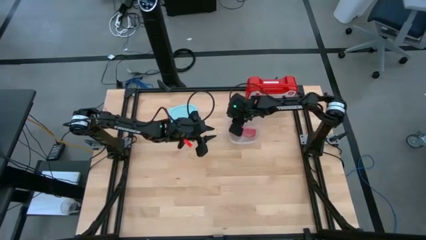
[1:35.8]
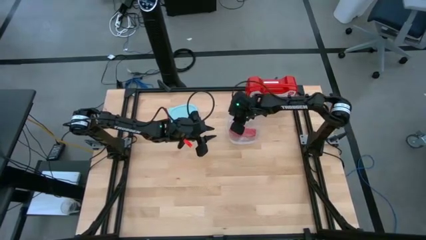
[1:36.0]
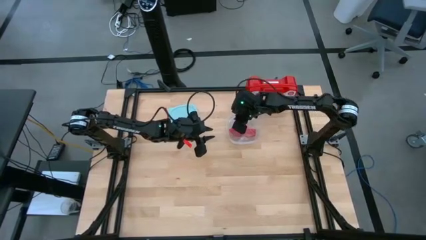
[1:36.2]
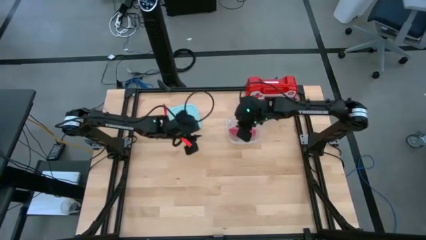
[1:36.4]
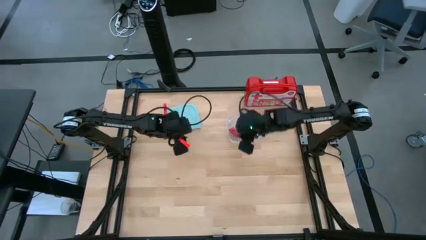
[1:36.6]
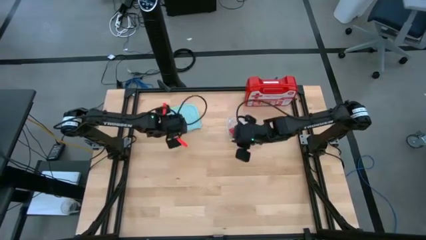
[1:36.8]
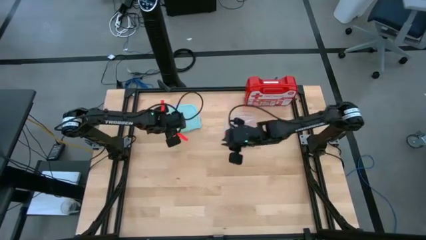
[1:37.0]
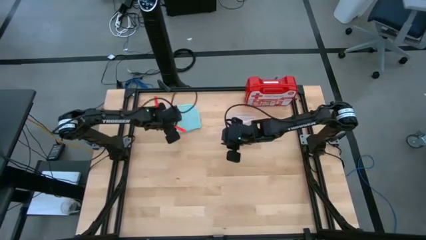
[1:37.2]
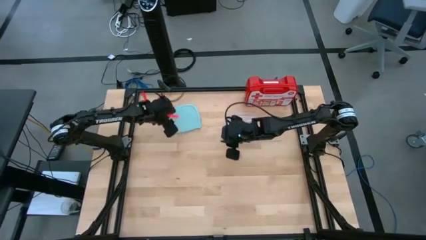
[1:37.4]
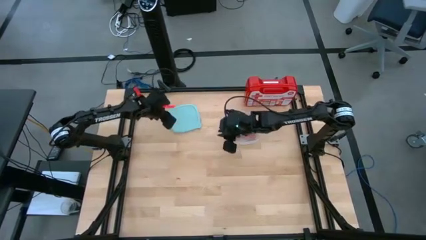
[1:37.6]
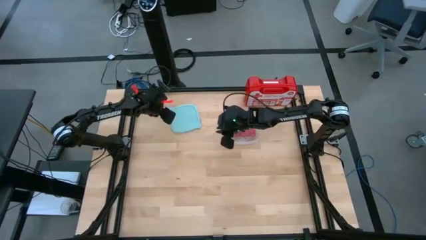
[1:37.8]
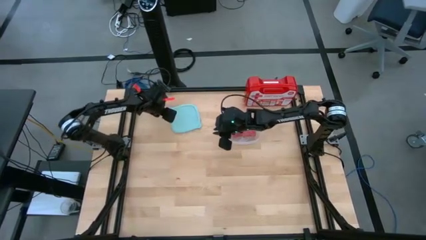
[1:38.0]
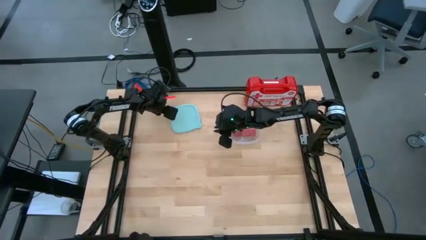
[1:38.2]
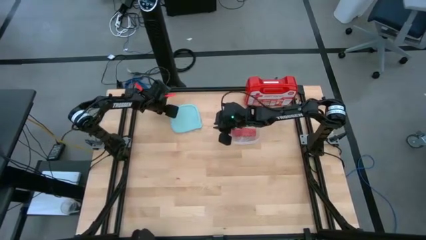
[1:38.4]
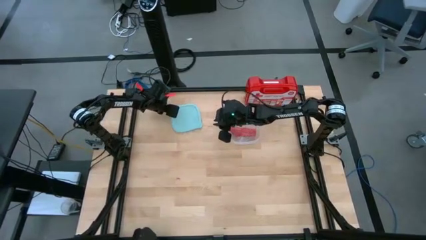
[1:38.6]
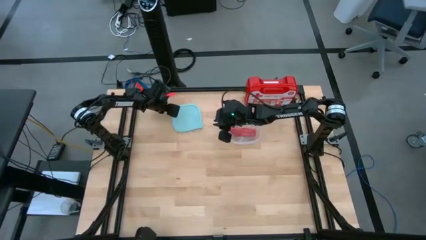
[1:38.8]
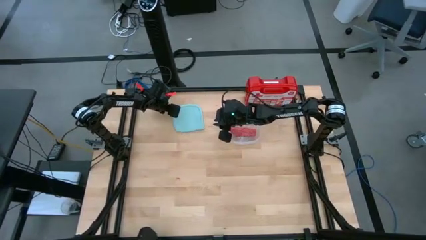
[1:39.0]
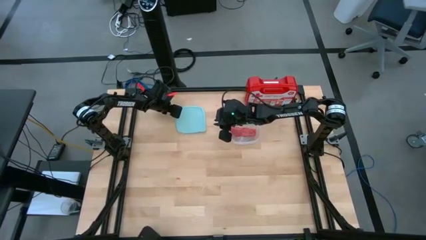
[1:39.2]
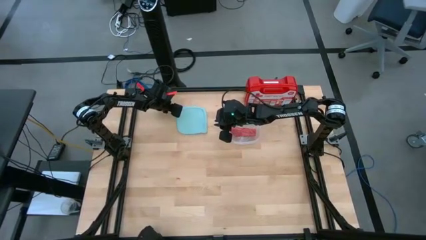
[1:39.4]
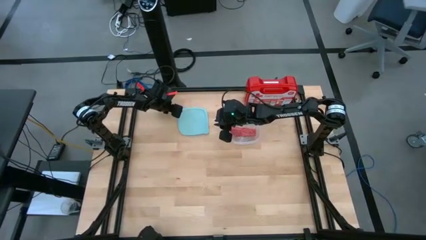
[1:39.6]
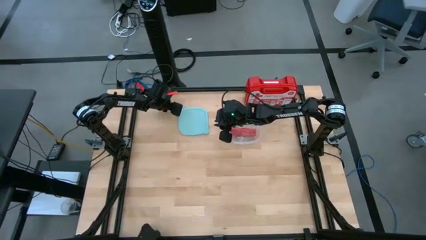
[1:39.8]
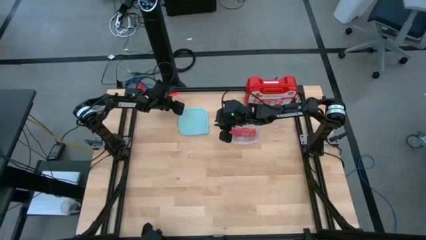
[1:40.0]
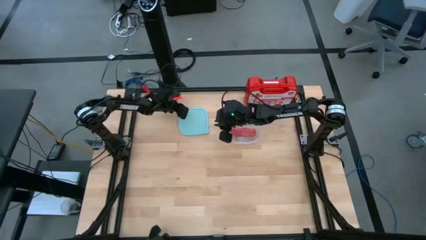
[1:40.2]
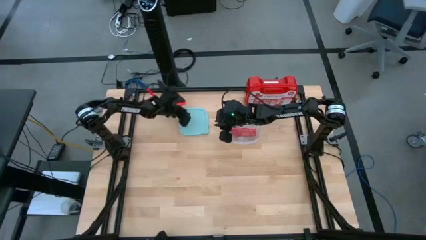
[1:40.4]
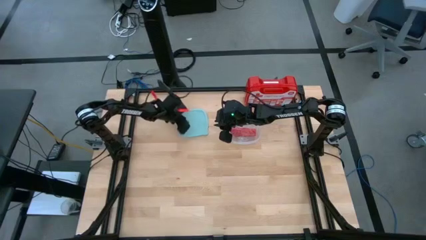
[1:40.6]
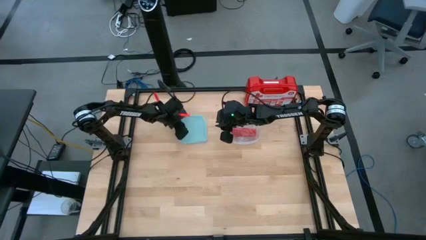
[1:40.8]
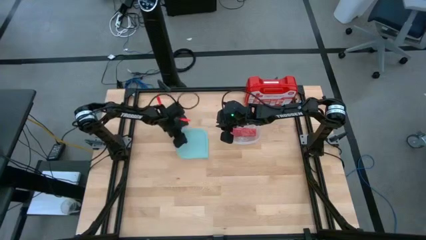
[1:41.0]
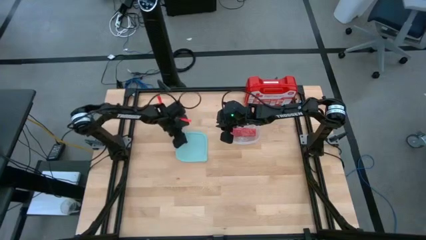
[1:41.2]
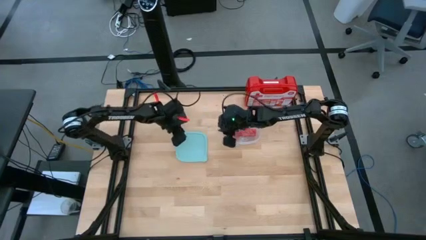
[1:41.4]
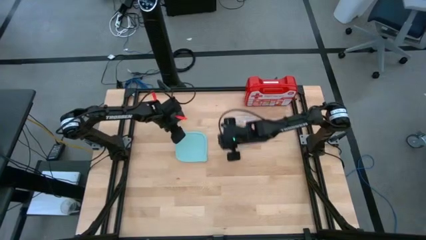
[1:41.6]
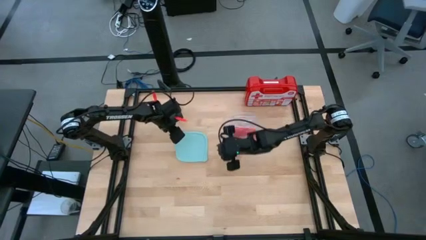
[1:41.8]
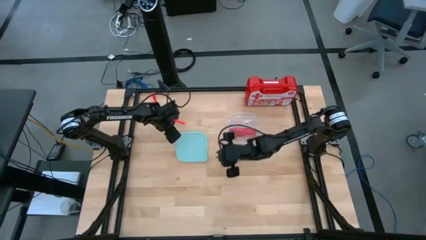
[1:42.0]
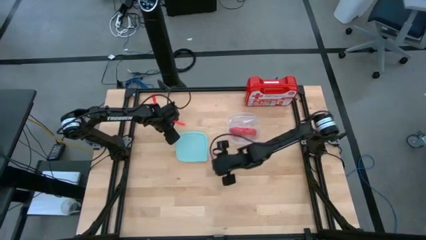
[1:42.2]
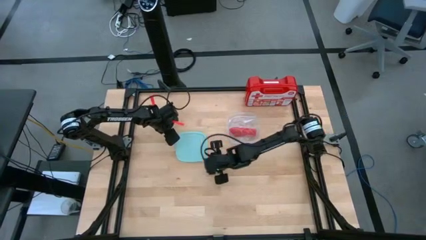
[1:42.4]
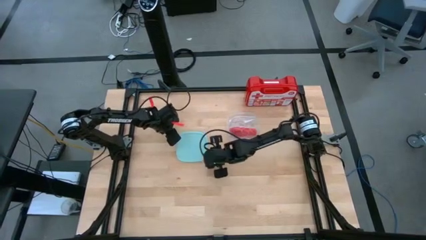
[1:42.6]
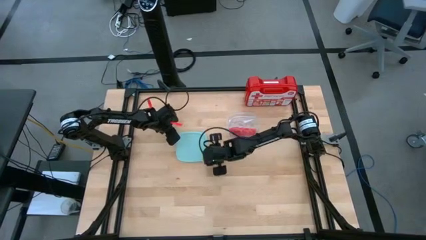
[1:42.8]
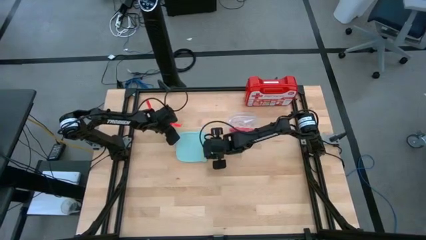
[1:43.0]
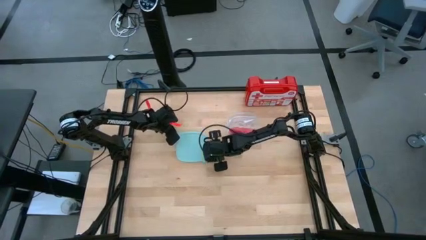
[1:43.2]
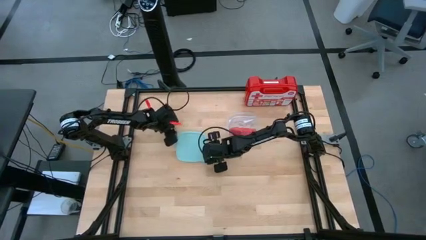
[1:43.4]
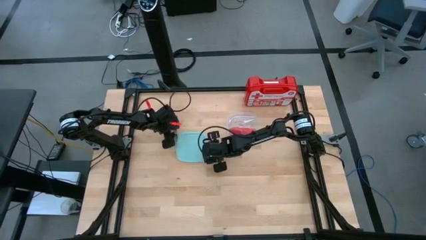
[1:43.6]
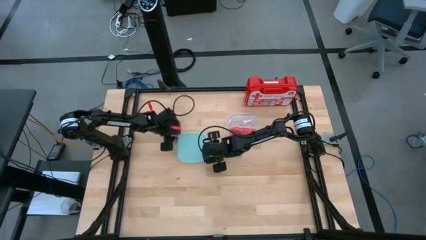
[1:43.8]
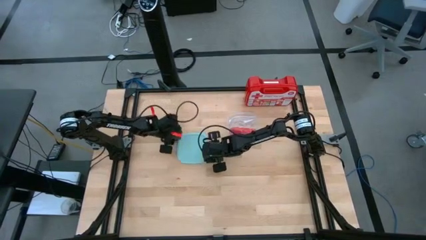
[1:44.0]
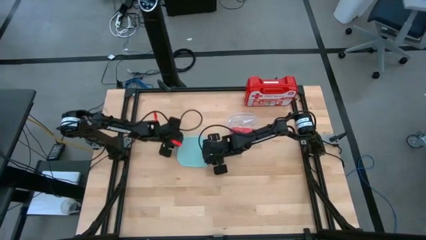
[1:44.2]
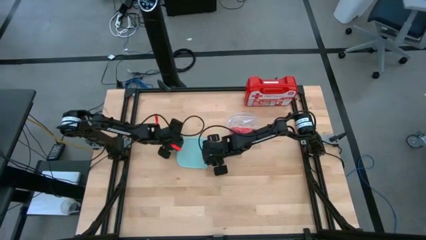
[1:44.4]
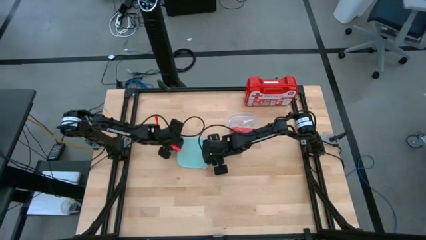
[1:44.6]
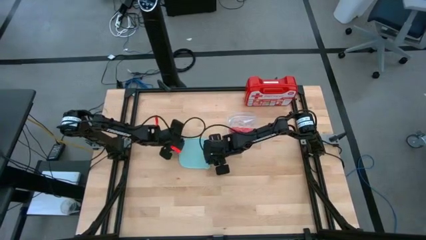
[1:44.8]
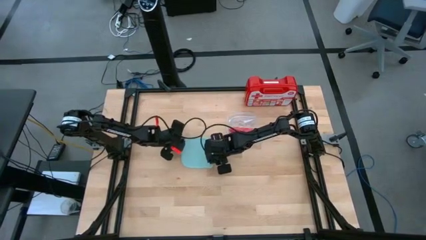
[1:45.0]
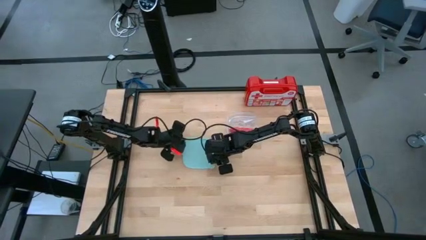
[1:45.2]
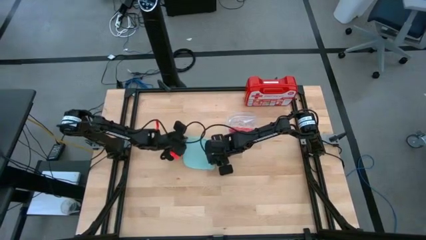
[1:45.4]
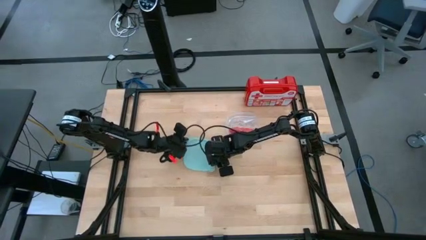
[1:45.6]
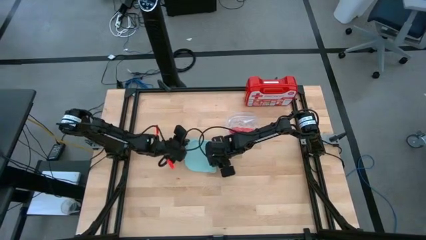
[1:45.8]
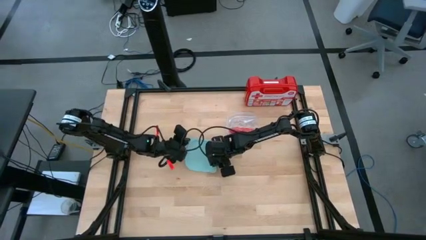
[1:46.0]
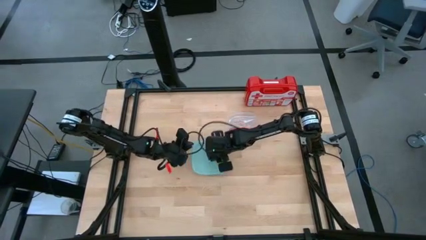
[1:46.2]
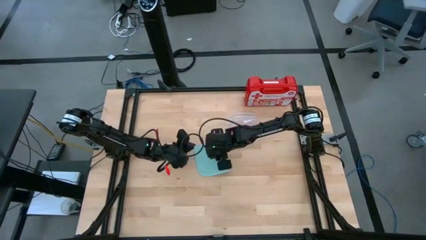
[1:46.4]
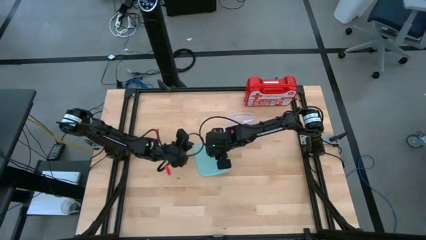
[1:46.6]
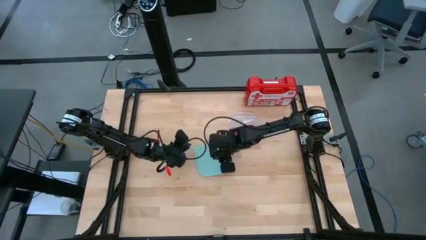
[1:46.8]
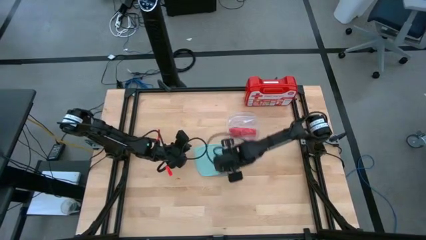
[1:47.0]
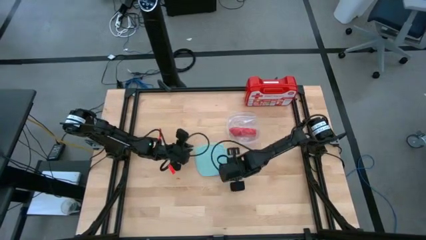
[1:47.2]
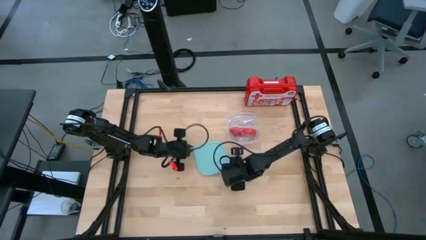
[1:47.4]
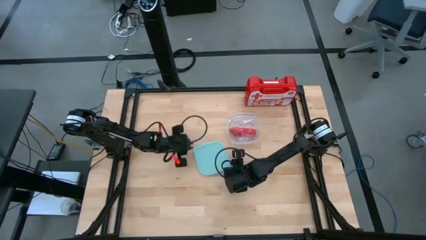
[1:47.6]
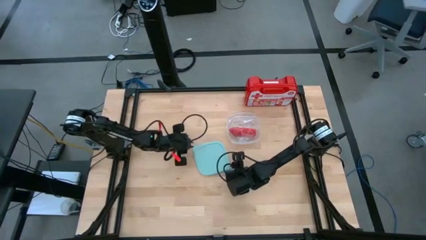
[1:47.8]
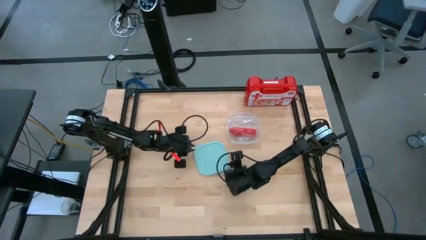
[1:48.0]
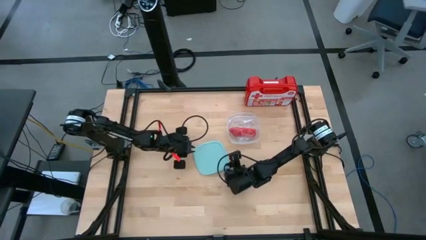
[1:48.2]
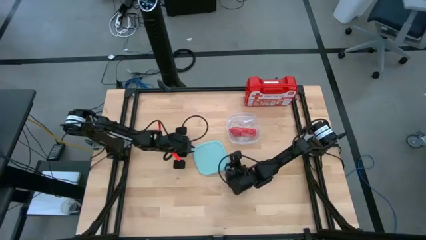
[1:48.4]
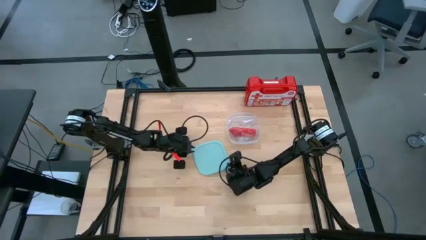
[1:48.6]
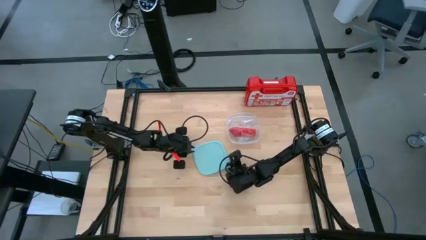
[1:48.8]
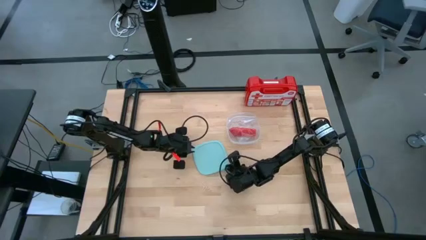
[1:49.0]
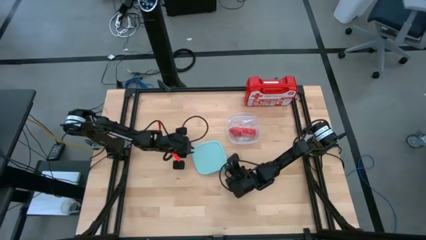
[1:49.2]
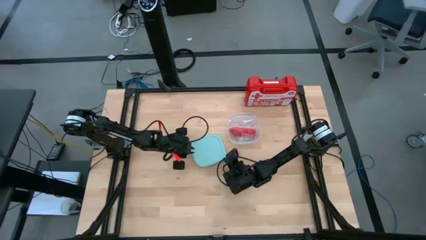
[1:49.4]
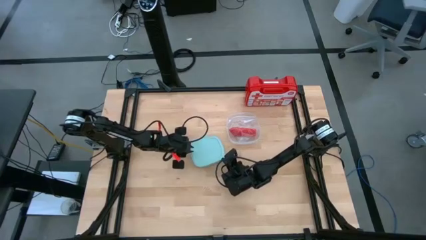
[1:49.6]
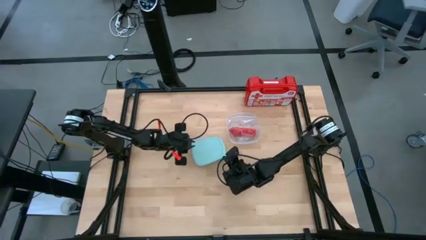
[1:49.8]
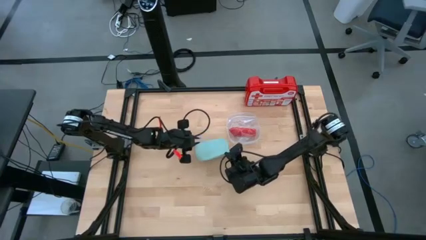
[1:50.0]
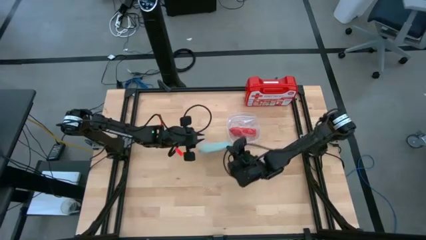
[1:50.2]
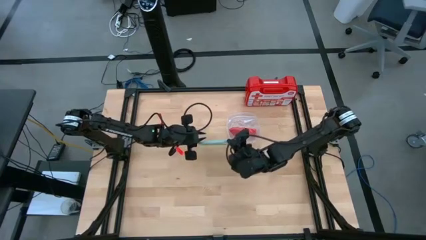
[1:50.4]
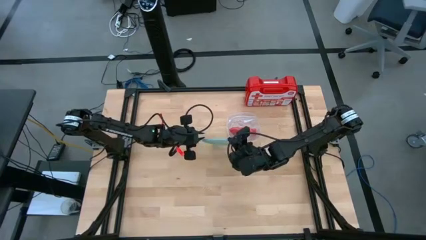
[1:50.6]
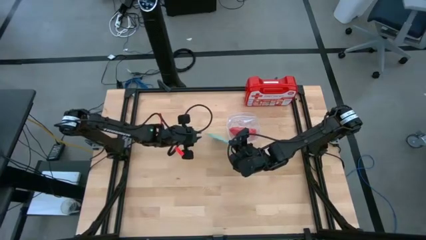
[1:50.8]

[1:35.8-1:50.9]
Task: Roll bandage
Close the plastic container

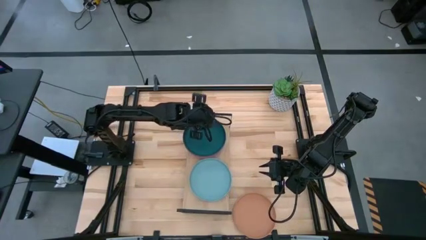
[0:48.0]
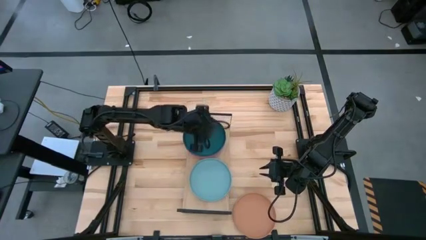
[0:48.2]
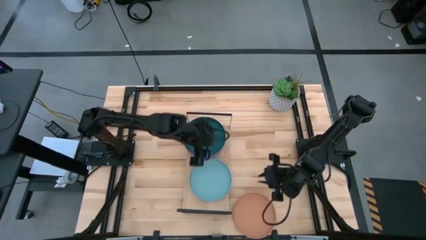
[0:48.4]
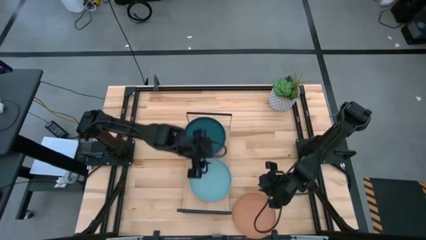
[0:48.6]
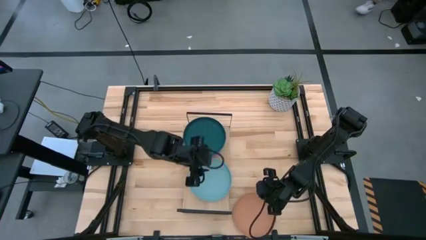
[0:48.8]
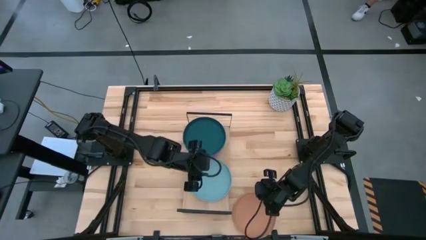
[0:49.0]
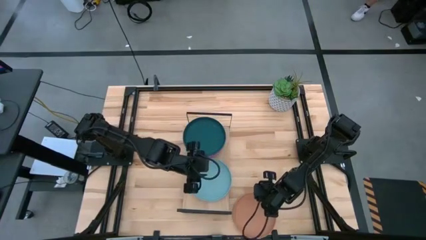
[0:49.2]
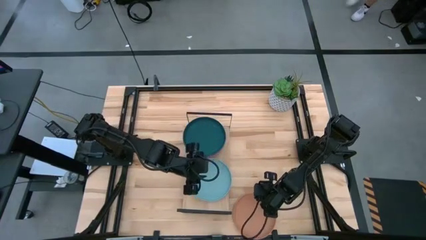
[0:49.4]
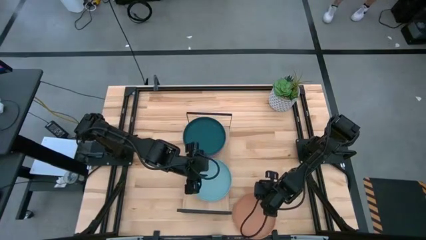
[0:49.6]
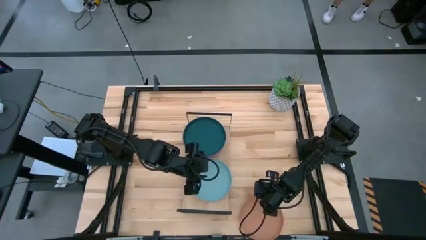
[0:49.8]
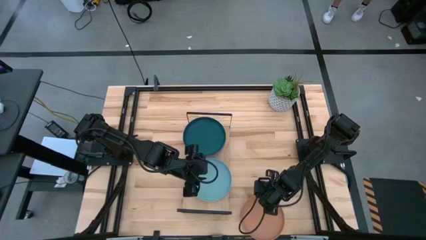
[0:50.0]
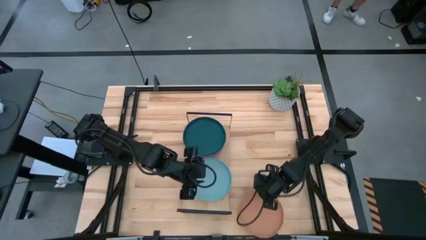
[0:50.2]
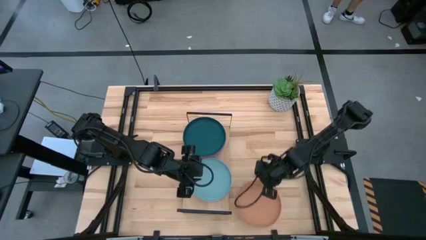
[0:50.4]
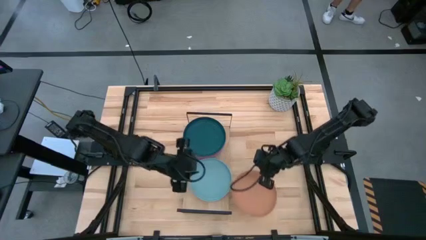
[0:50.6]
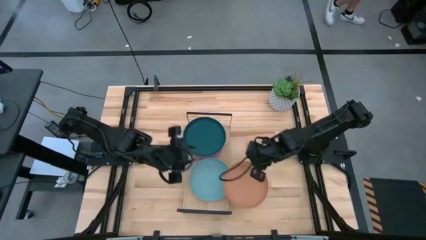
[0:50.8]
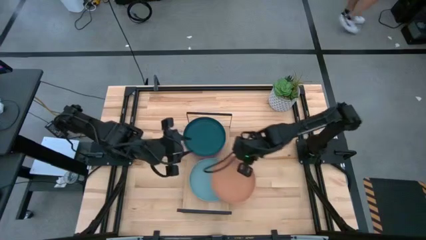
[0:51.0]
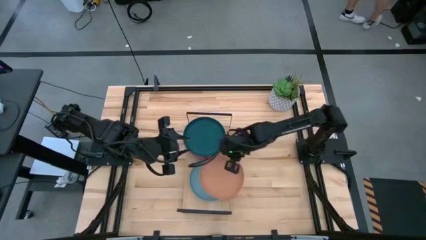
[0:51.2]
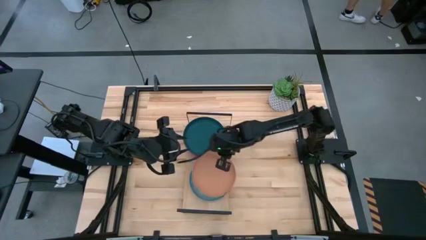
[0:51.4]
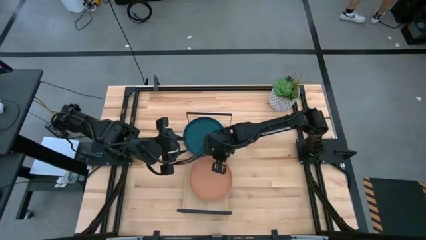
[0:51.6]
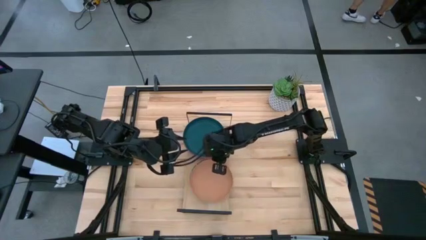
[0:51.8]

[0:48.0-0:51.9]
Task: Place and stack plates onto a shelf
Stack the brown plate on top of the light blue plate on the shelf
